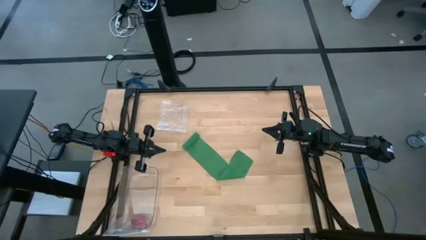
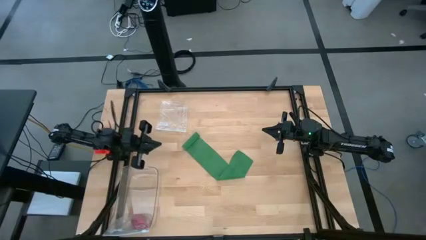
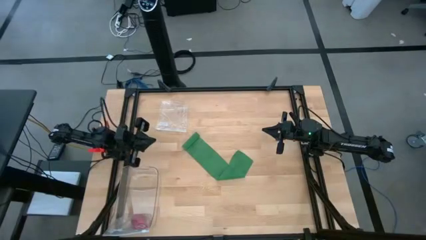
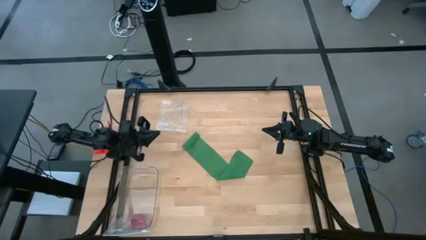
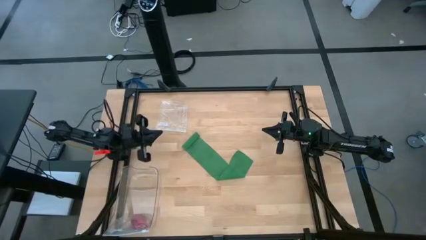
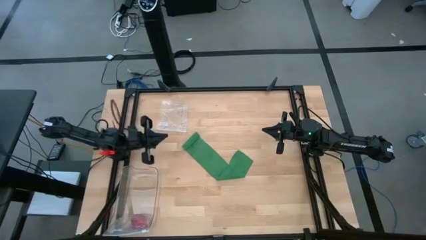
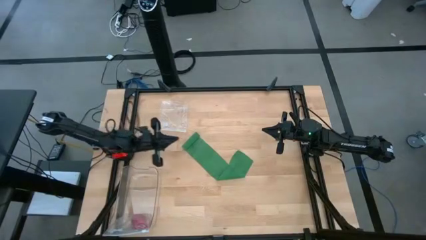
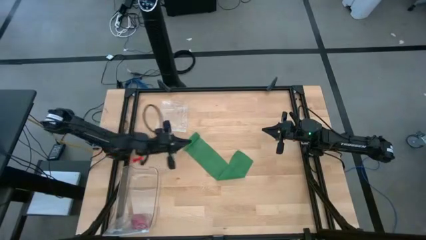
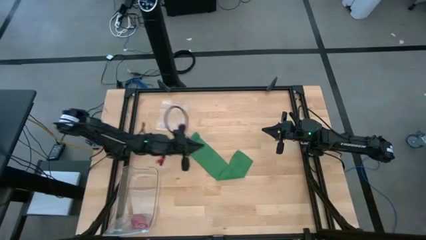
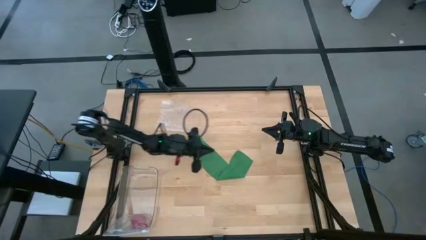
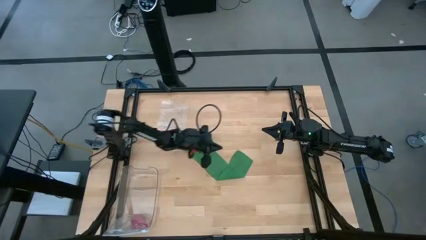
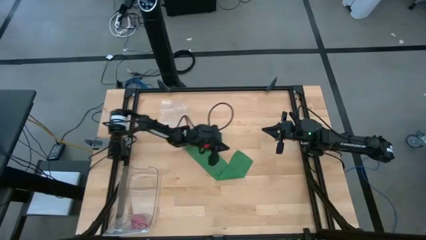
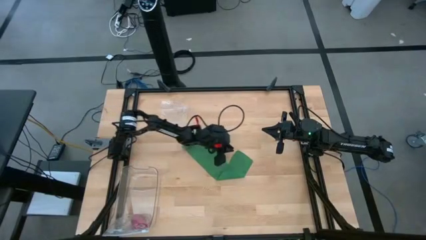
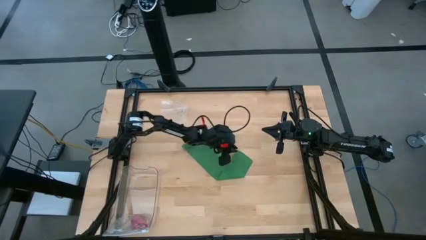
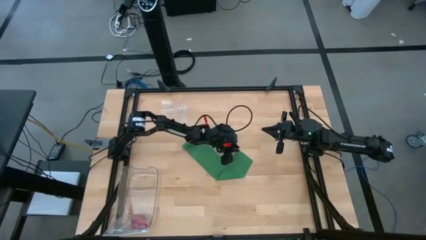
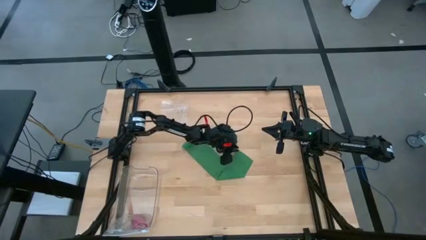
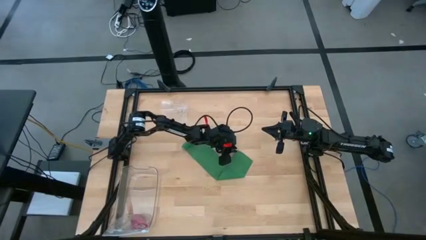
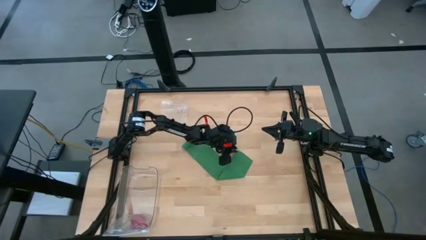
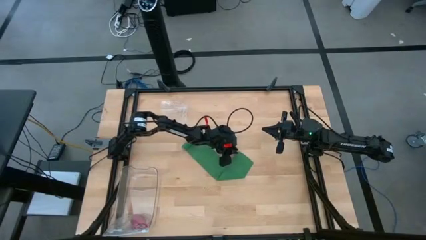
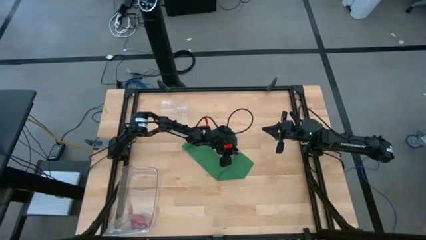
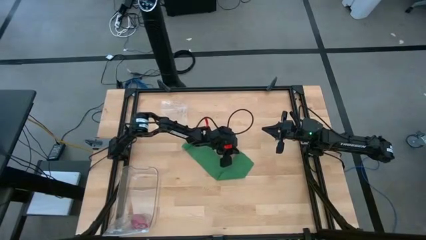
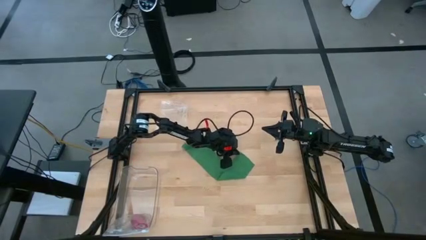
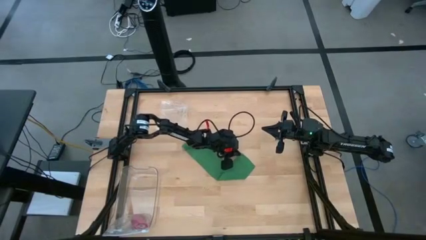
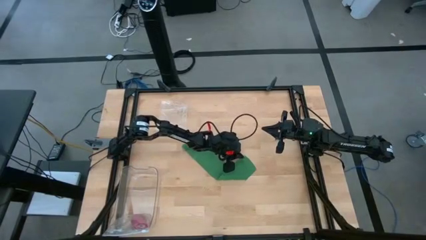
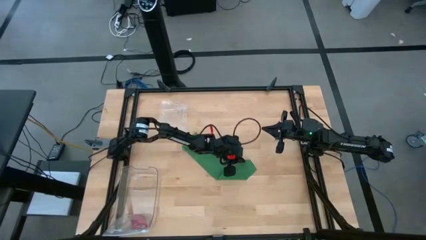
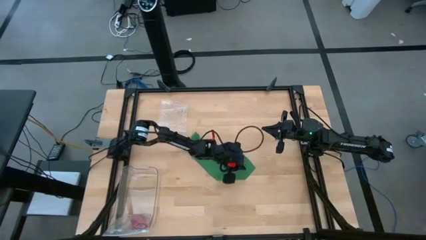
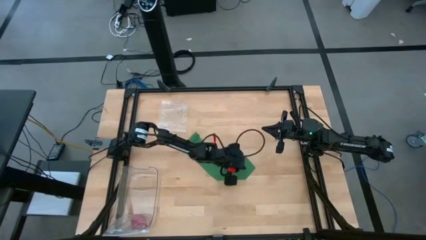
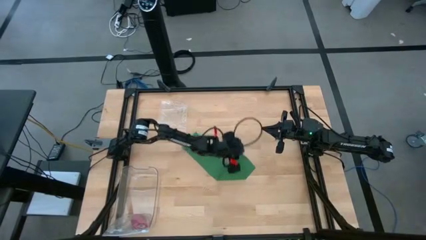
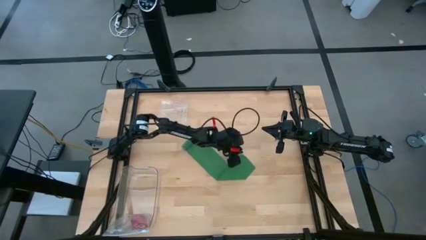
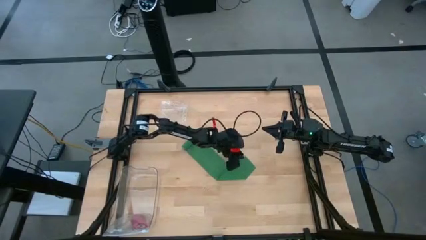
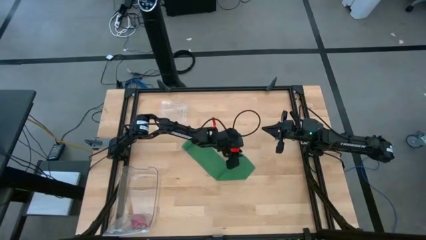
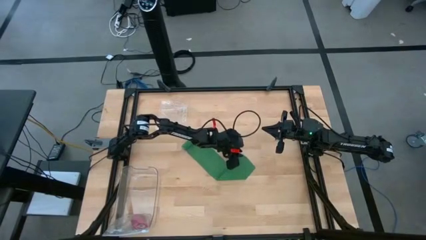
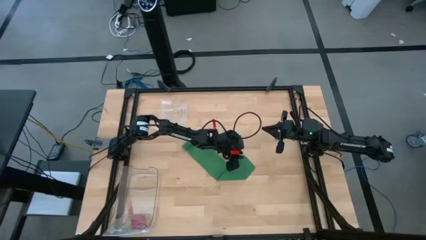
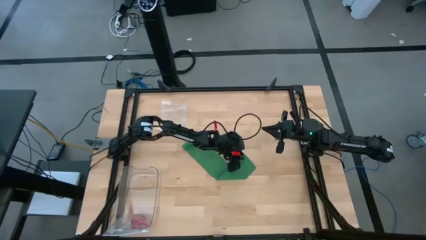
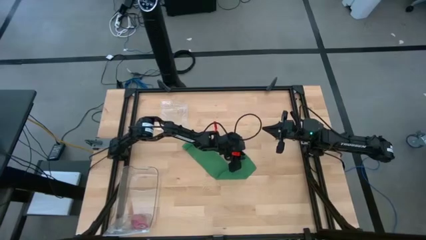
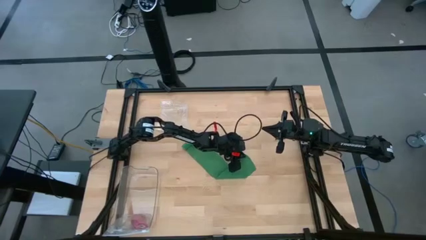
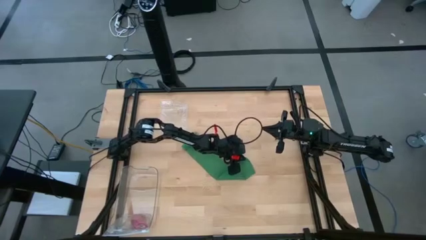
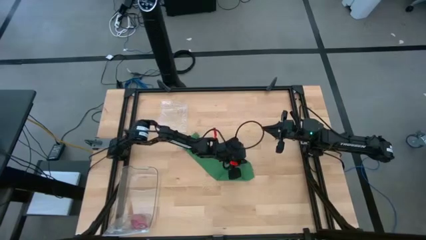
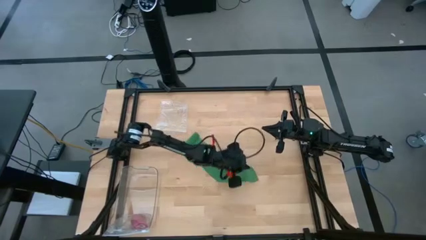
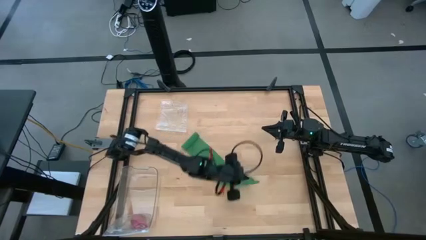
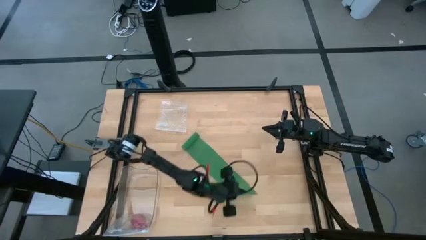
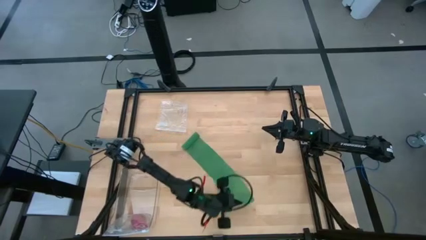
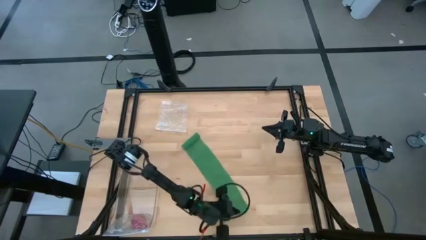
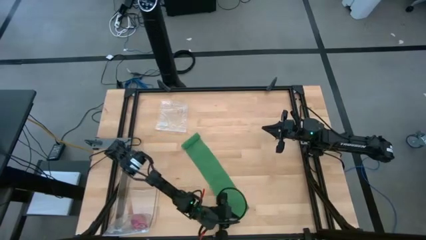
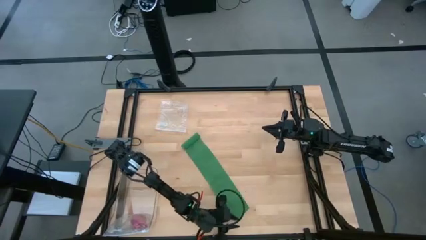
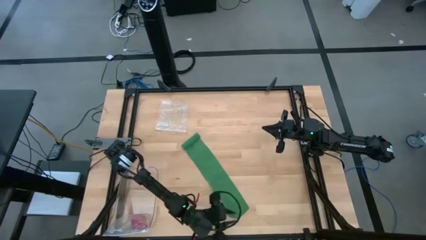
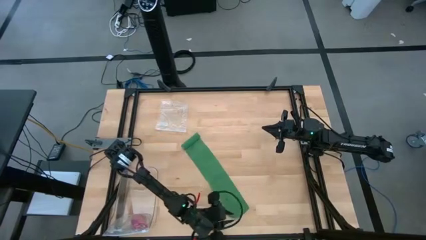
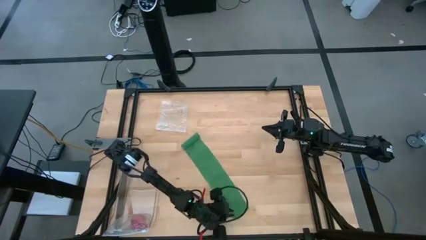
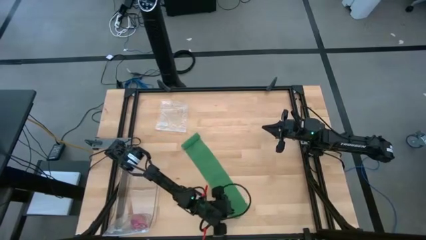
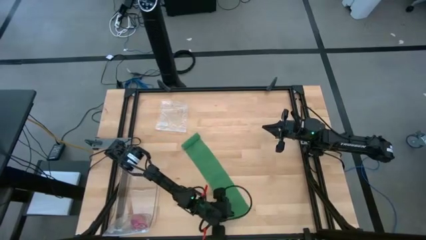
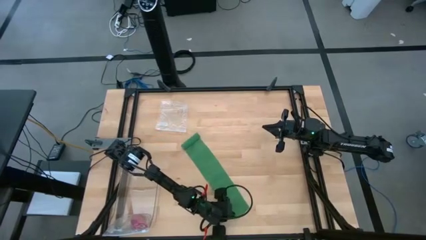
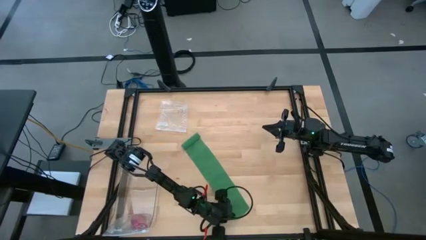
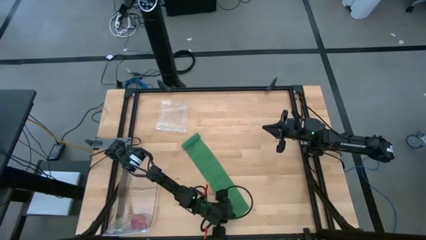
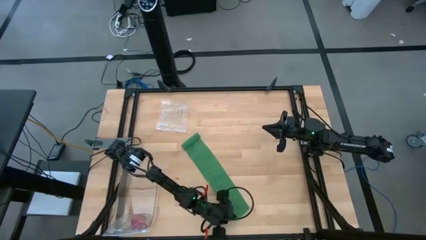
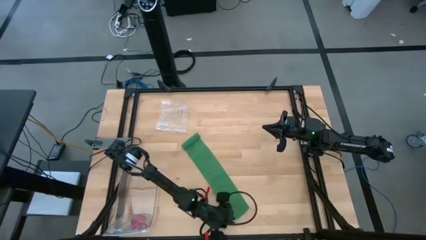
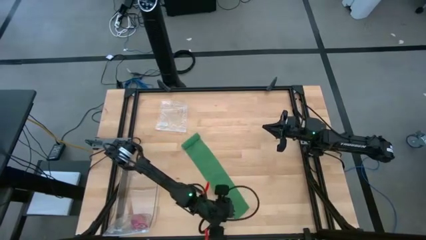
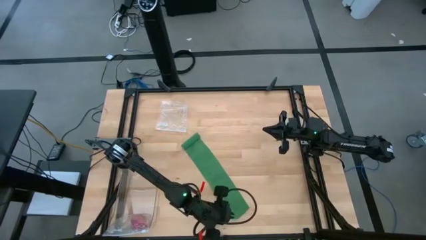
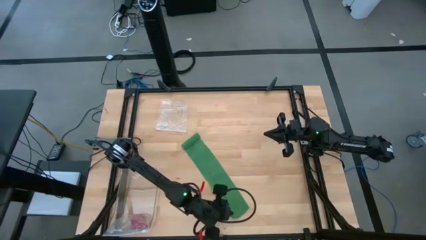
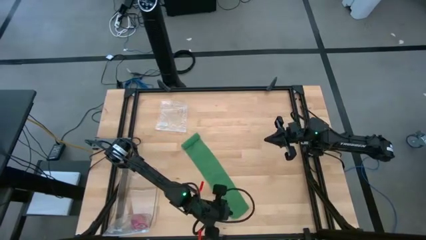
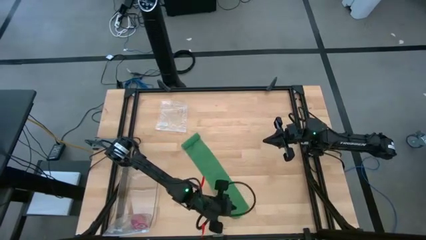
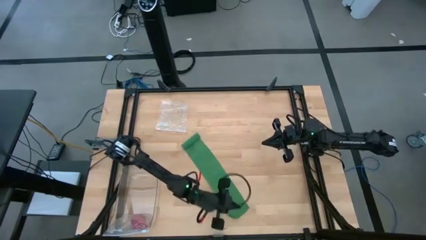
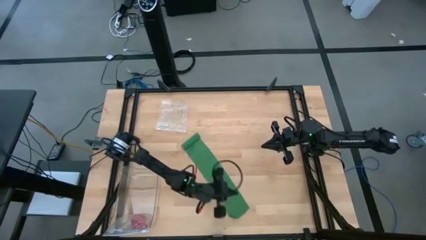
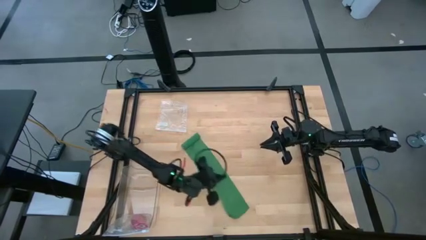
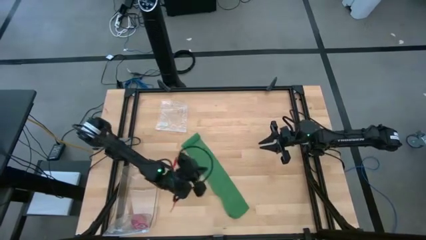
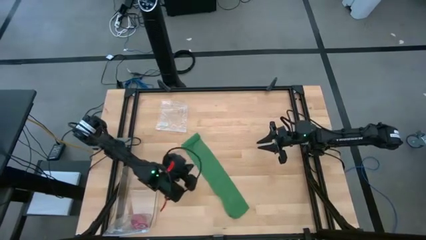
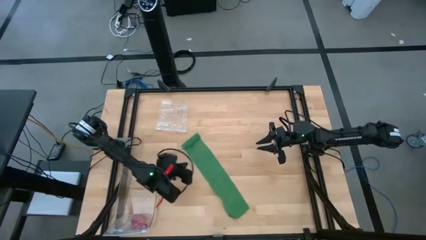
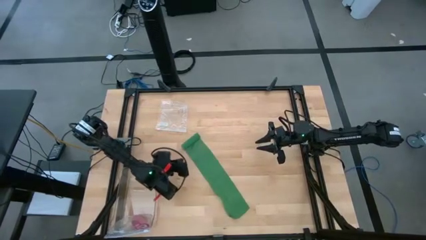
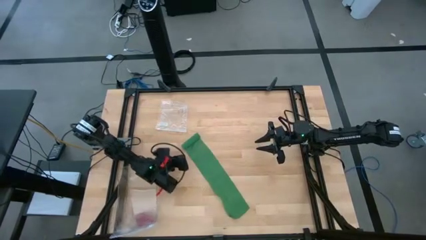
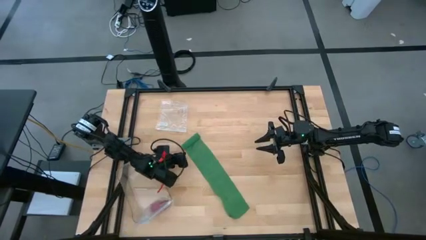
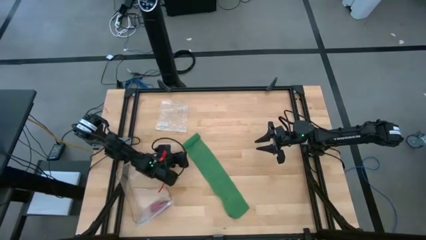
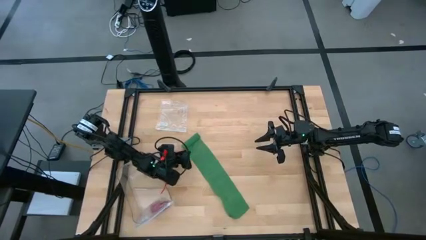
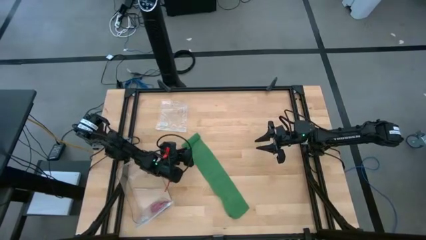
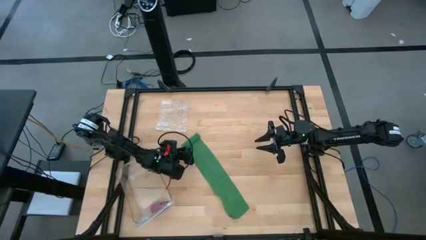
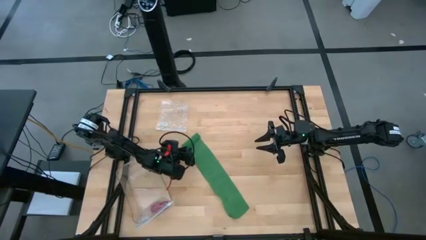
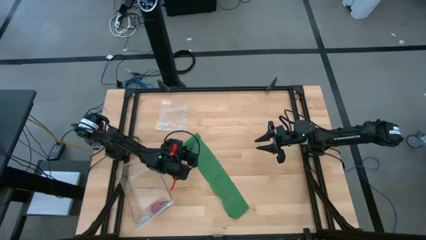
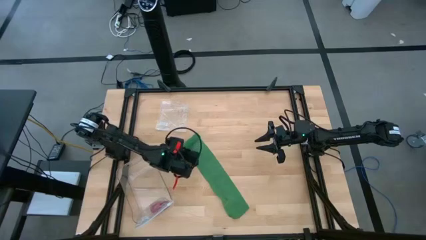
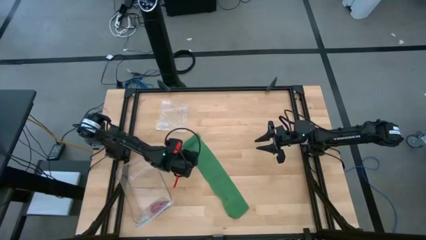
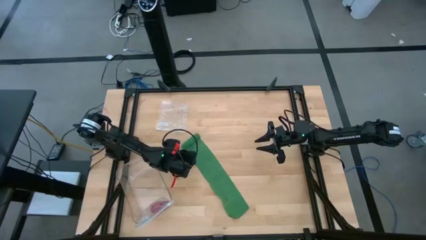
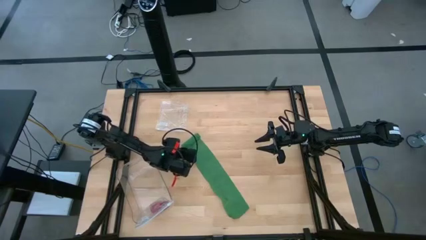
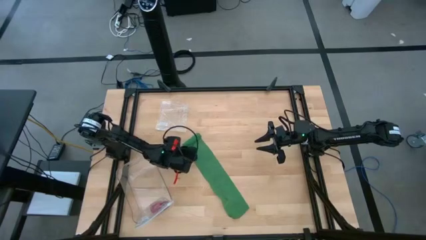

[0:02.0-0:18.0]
Task: Roll bandage
Roll the green bandage
